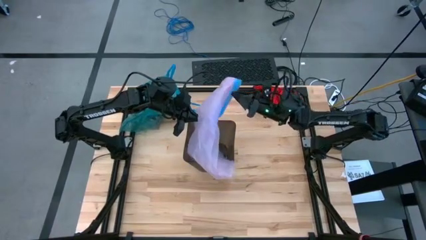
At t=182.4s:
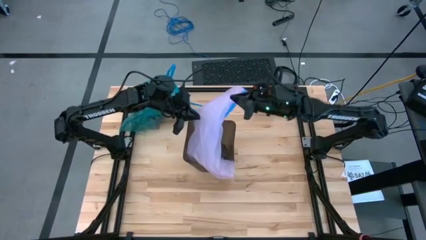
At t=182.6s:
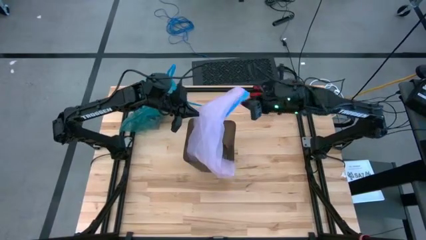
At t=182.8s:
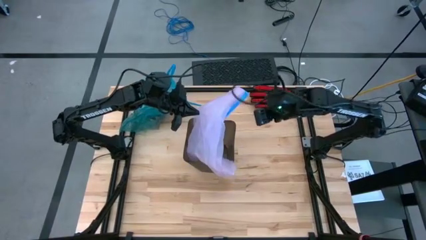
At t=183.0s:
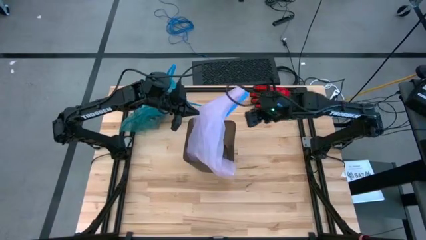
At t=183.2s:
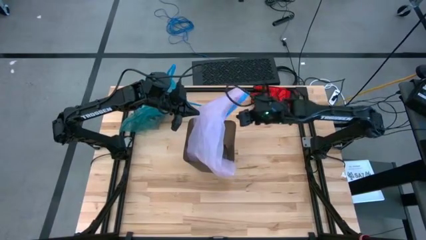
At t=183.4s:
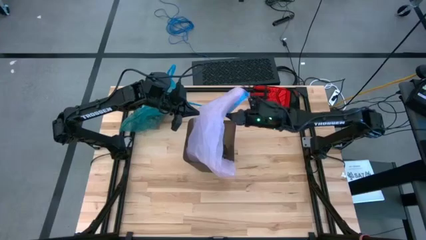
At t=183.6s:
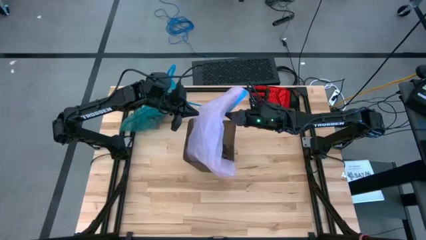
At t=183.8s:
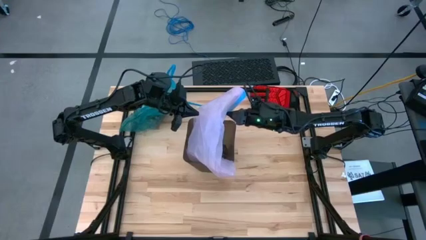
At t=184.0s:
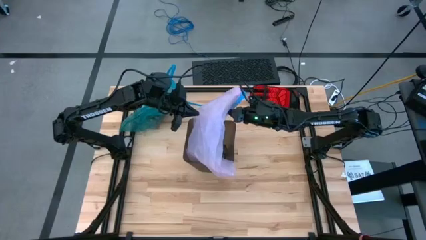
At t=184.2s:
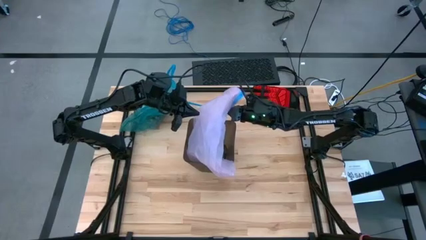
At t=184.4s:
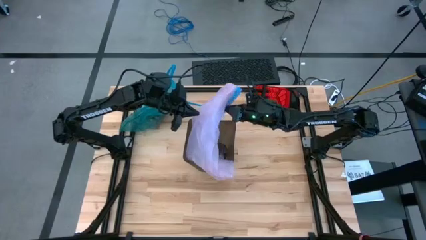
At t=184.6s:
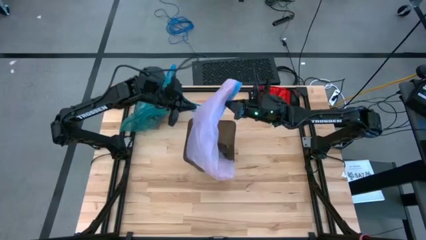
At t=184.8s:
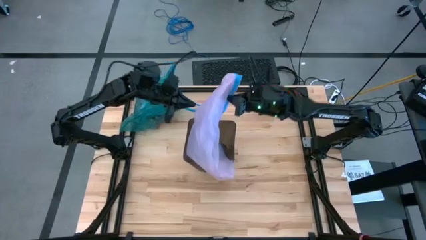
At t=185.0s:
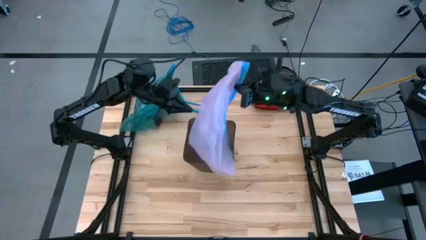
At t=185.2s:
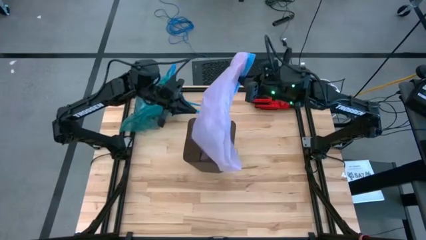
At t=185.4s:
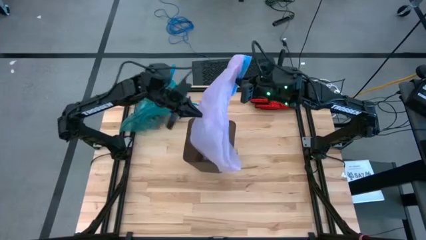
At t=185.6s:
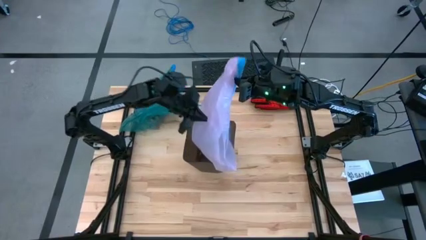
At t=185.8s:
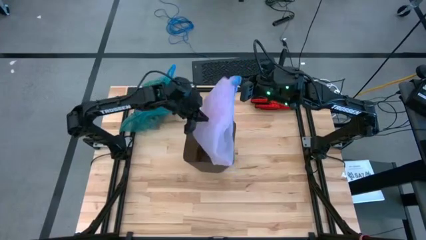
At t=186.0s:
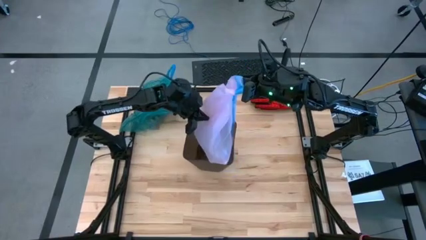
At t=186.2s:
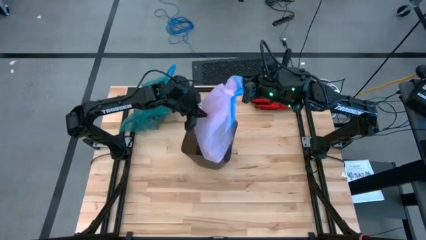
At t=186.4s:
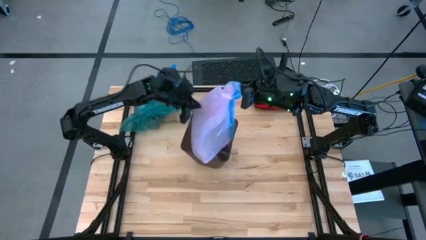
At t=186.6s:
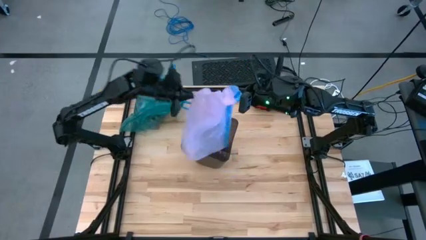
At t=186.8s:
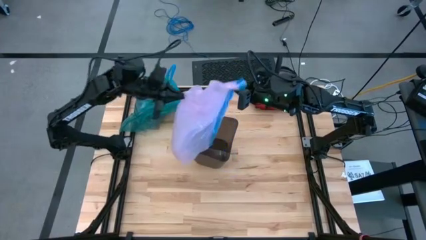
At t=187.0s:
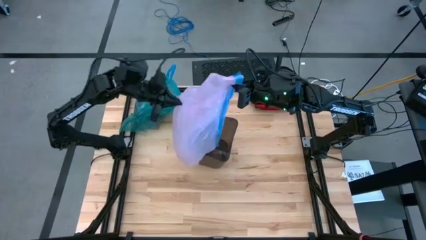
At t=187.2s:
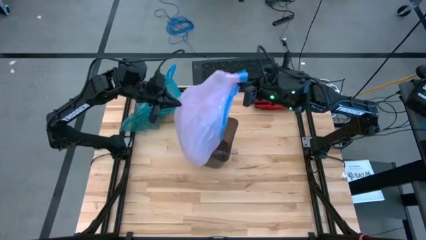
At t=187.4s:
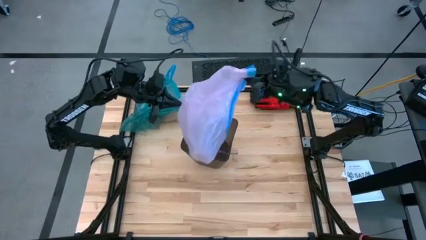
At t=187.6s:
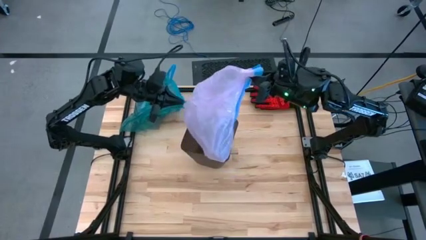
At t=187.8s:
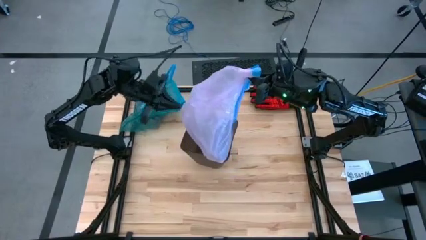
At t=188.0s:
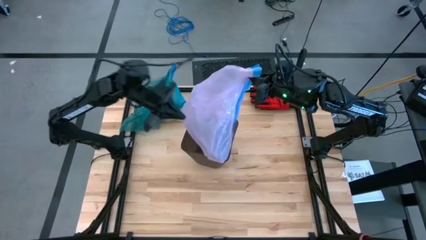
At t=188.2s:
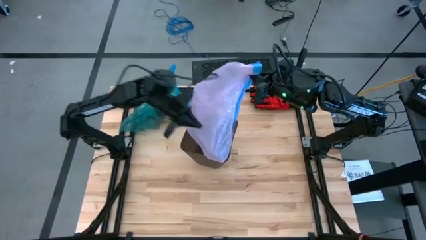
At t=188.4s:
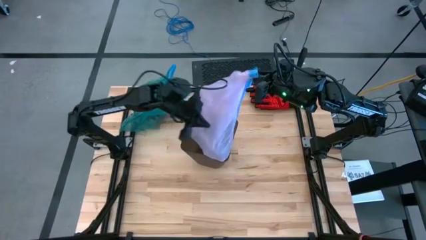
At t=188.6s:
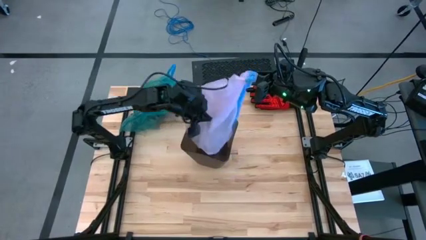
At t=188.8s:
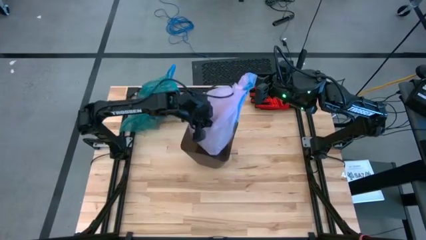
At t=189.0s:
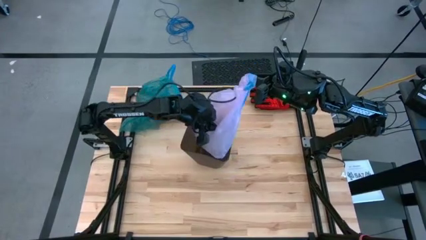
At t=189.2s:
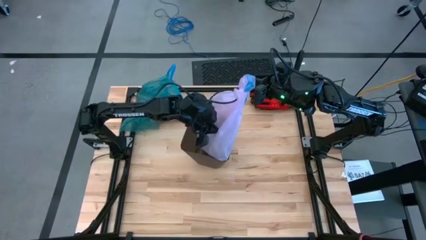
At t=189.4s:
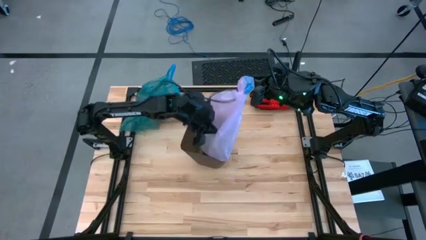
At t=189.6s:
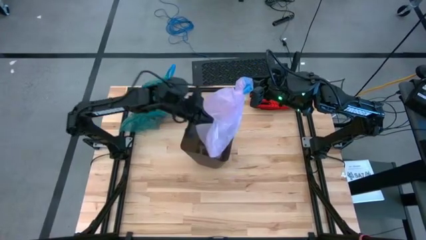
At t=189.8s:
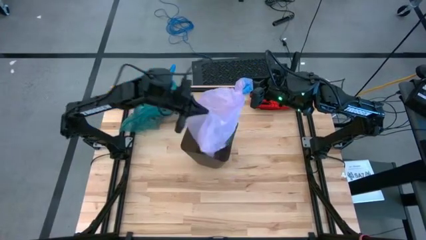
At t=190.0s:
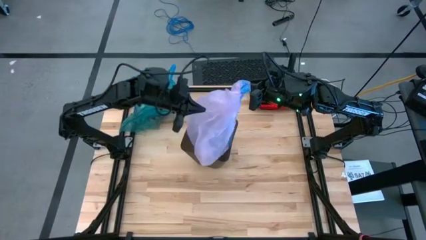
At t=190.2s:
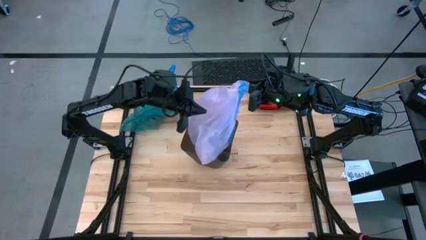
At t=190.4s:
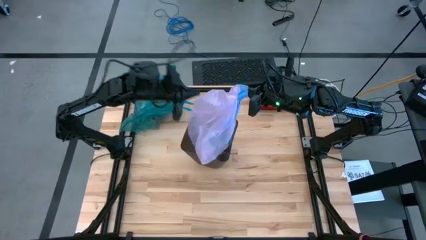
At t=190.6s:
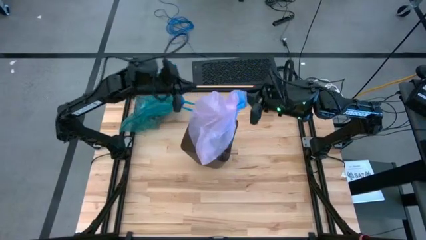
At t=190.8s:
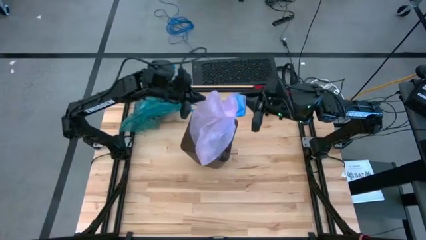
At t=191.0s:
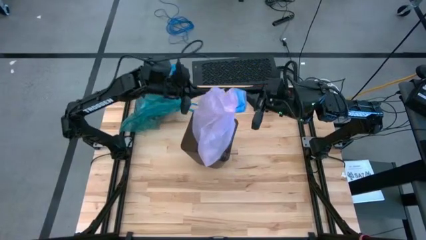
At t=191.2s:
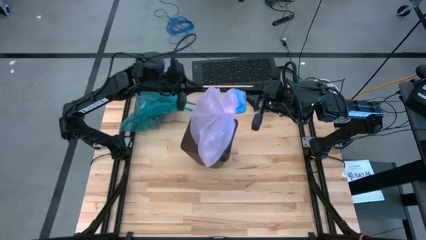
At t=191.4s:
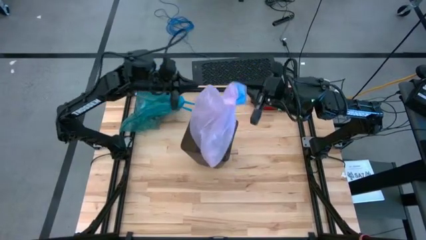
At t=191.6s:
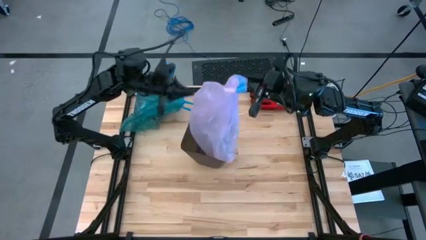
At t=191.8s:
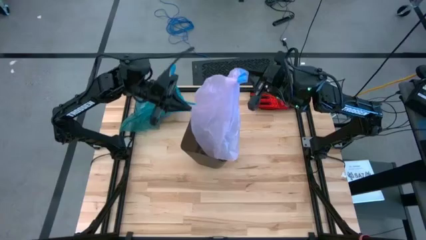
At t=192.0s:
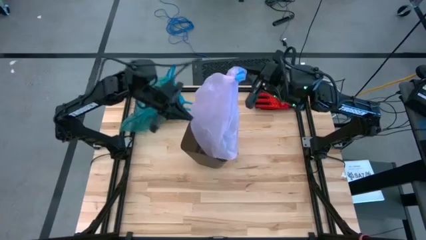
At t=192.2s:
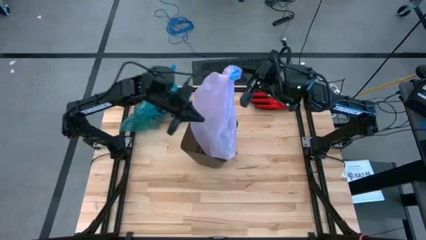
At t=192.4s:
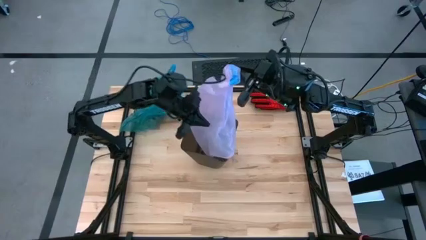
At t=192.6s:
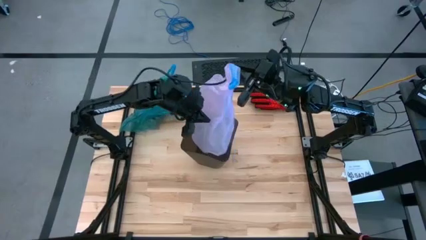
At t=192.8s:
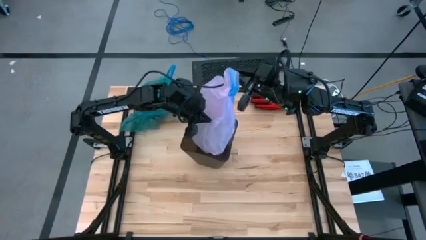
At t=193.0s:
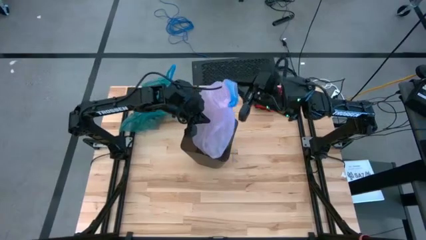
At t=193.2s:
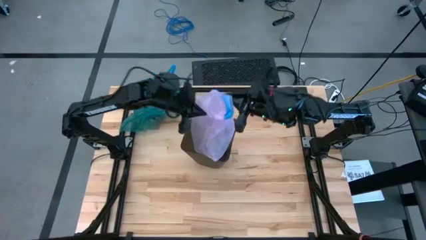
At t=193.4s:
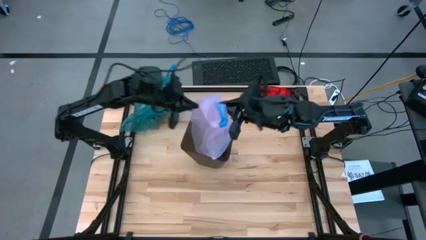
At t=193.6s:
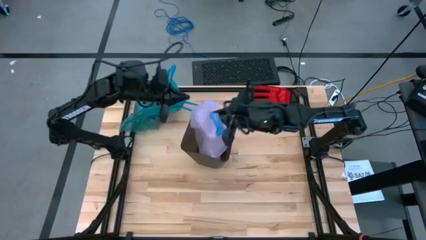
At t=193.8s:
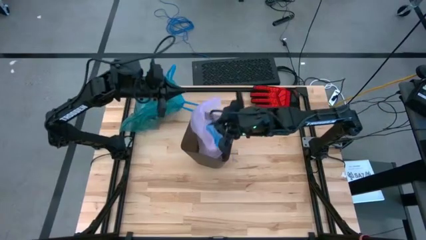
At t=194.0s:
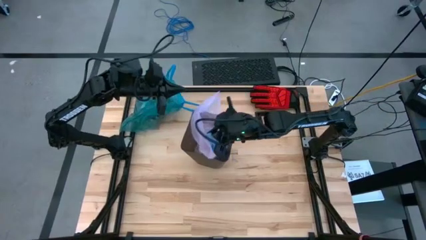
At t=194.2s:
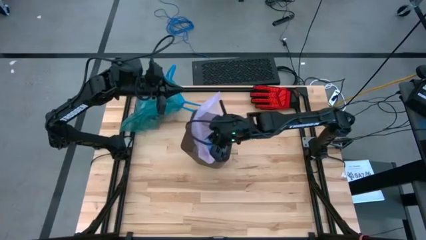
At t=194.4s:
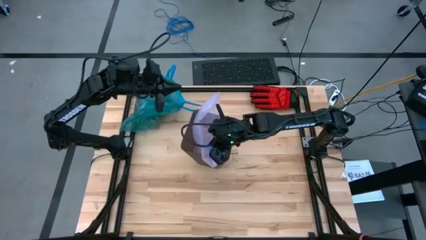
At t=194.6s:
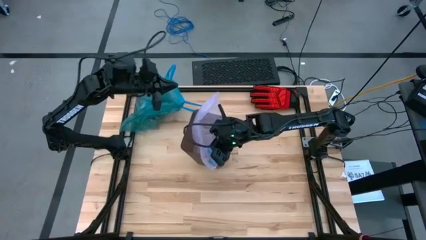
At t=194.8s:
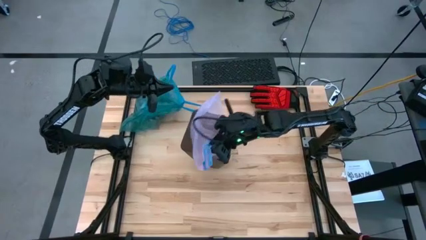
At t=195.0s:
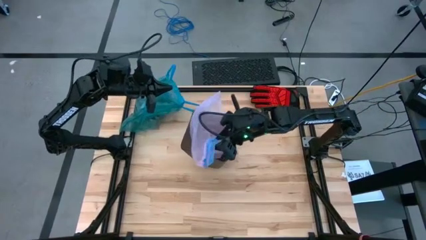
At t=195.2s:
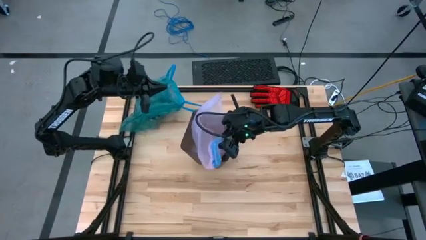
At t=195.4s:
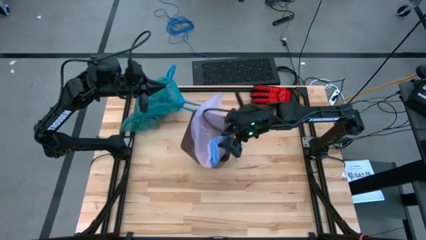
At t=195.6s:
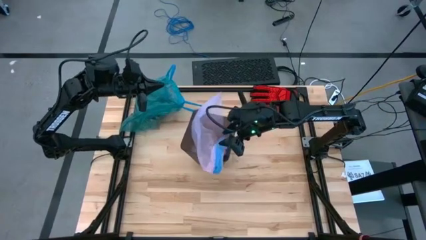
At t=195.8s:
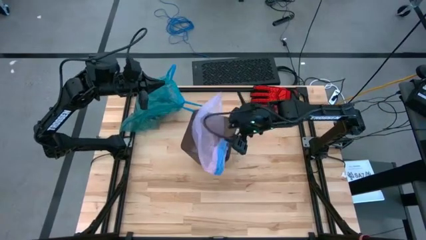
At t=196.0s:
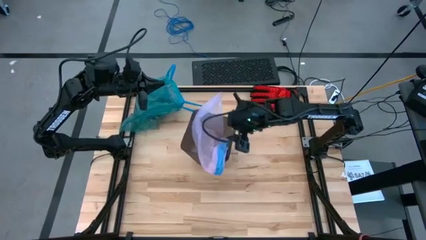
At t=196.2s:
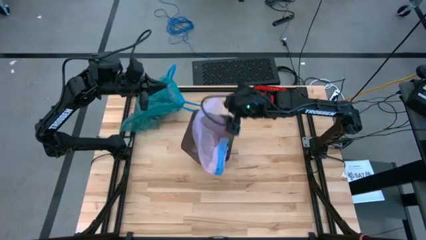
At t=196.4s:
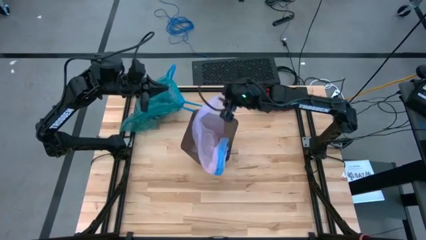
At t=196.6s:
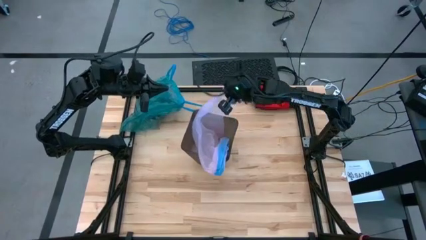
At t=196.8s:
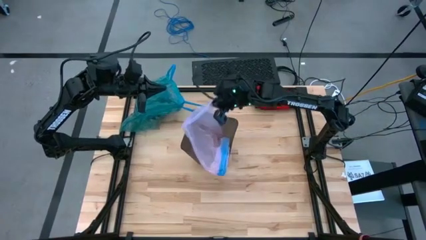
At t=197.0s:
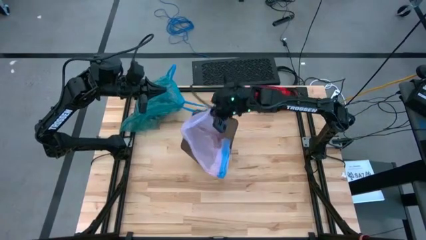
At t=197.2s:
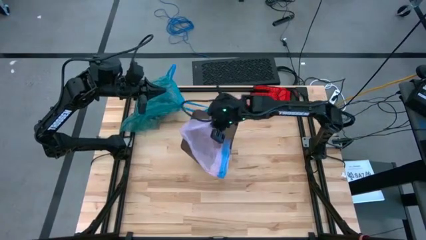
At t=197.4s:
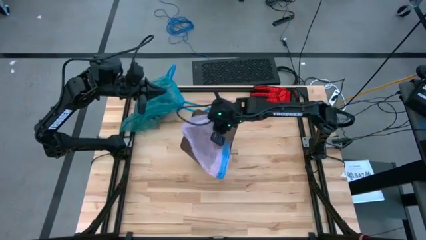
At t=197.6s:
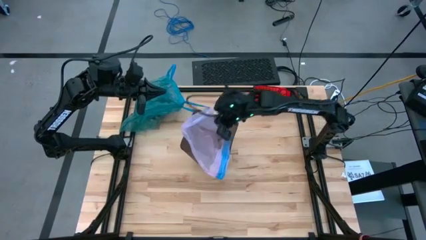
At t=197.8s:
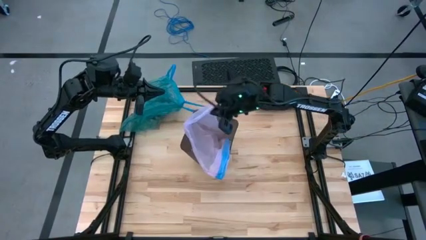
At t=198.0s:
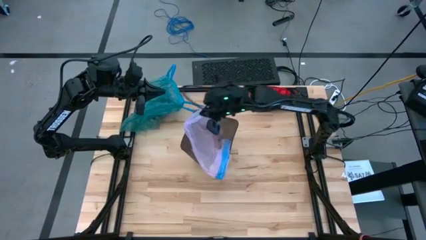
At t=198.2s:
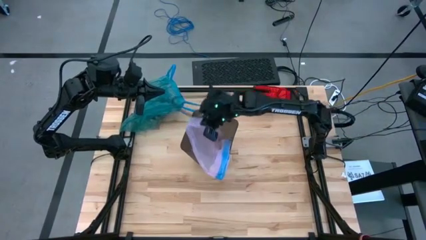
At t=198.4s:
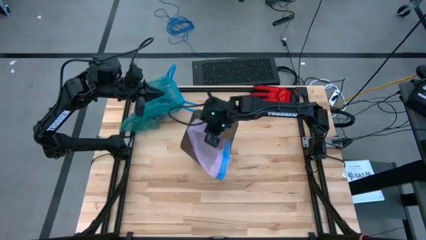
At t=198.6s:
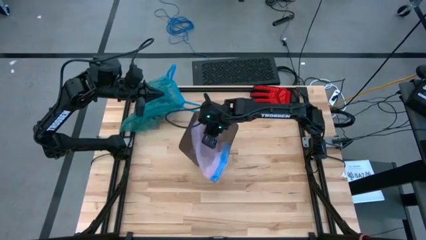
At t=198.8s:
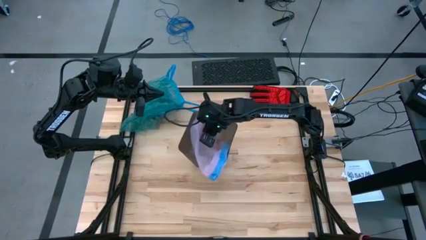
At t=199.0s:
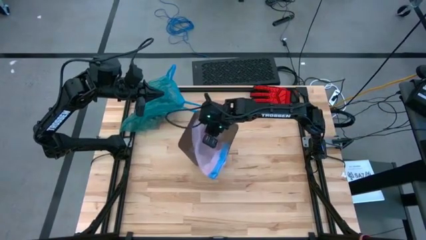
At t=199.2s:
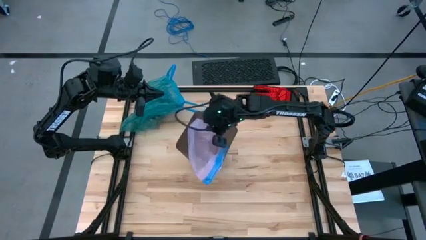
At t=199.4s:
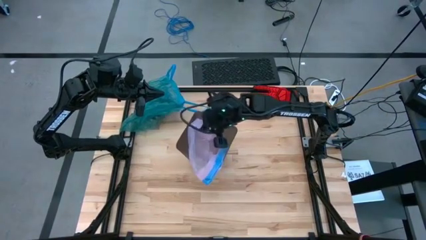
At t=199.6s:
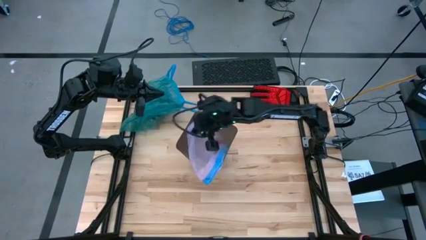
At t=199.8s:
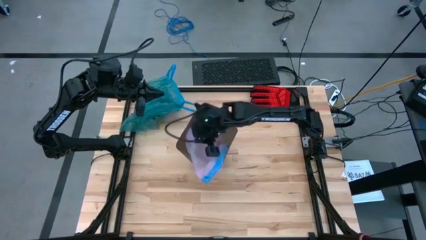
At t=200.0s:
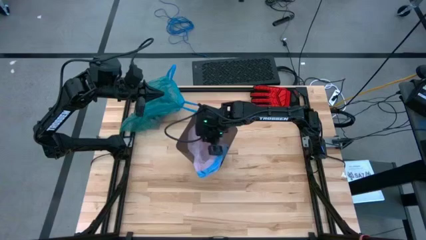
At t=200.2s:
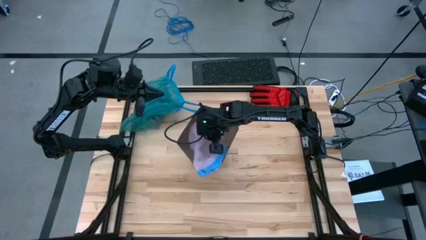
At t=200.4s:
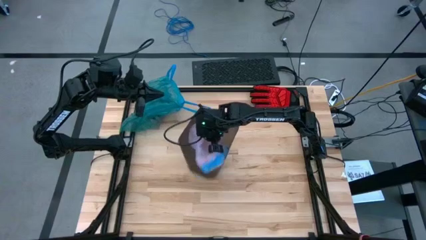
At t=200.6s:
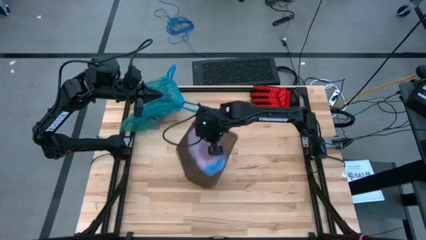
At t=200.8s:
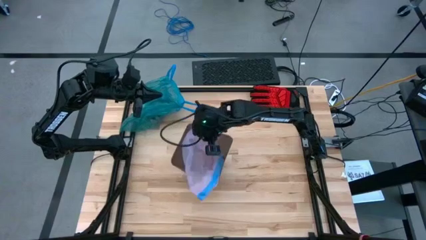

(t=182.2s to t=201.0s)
Task: place trash/remove bag and relplace
Insert a new pink trash bag into the black trash bin
